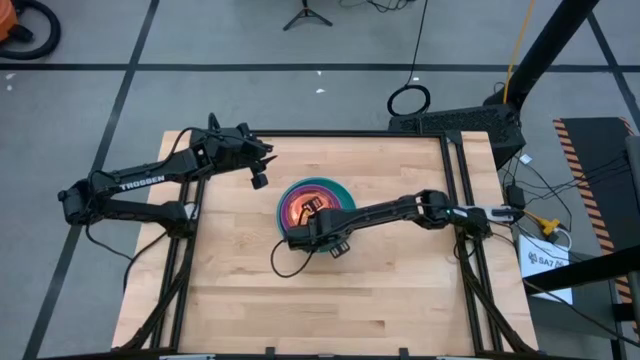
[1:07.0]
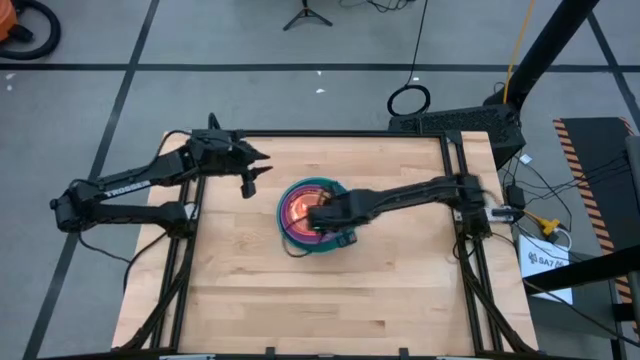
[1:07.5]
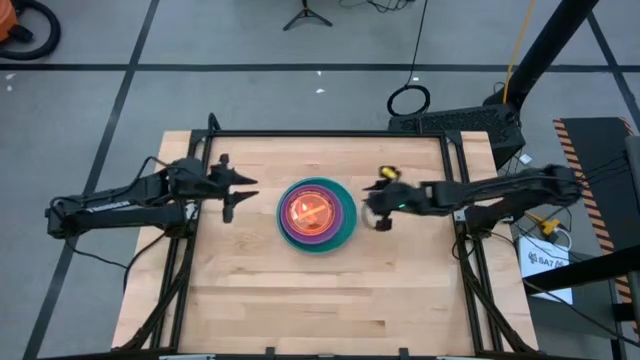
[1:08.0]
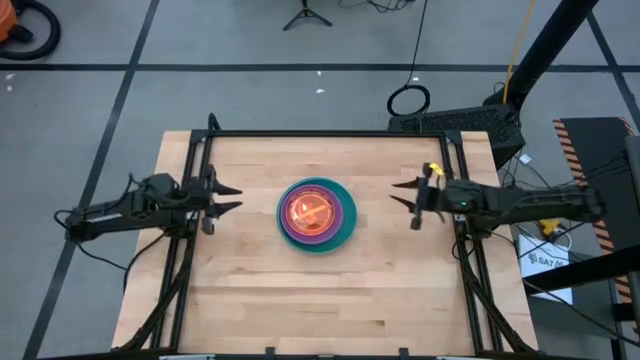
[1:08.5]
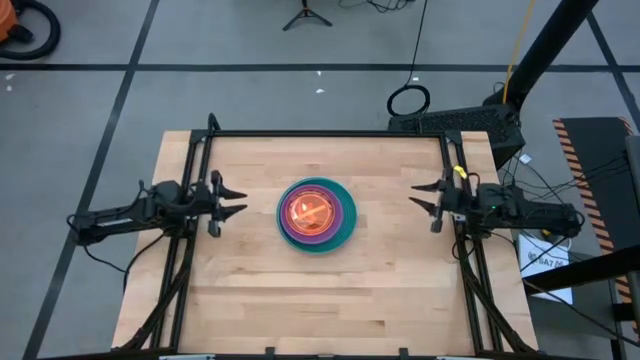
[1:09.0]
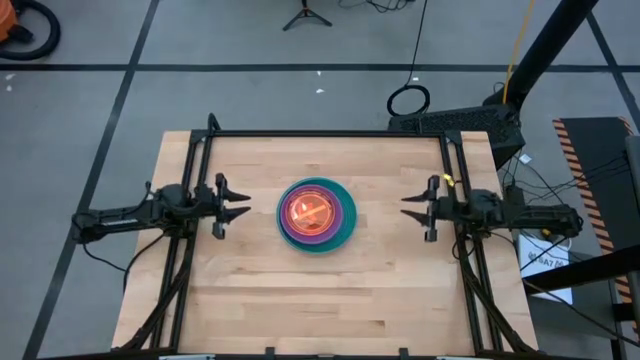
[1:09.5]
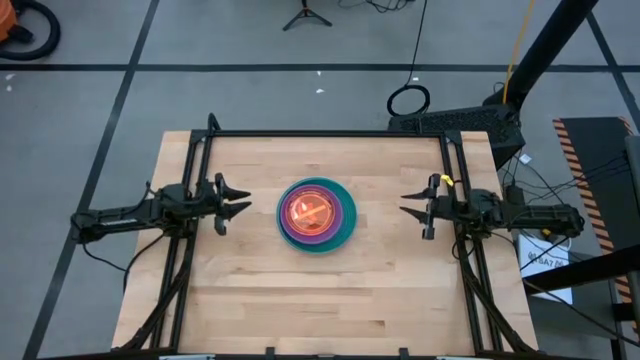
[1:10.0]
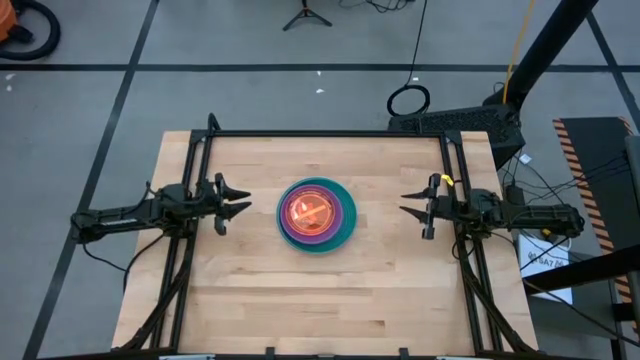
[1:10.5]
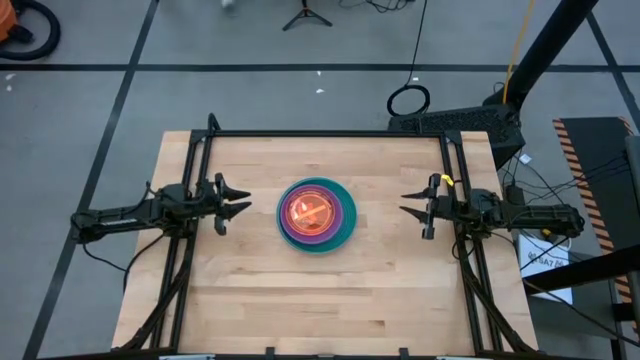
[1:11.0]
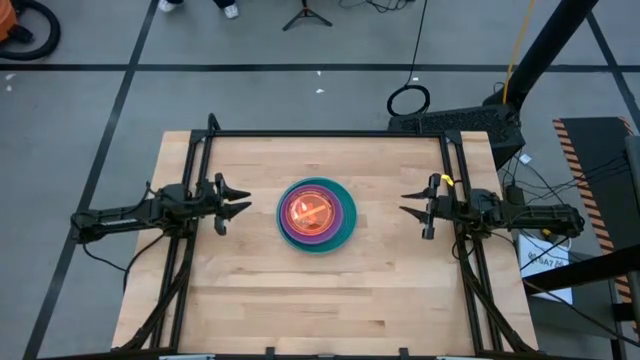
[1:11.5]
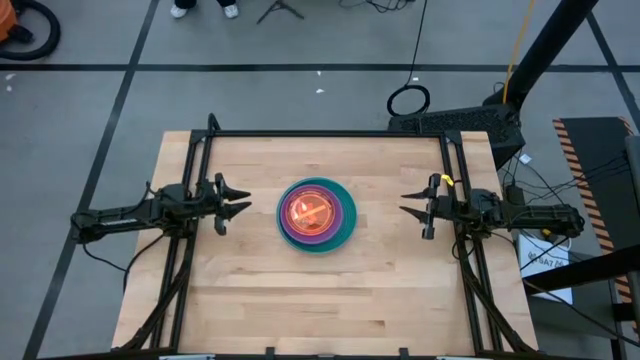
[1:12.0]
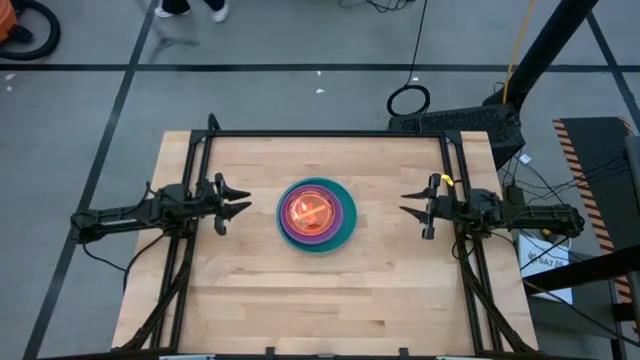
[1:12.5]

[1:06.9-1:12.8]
Task: Stack plastic plates
Return to Home Position

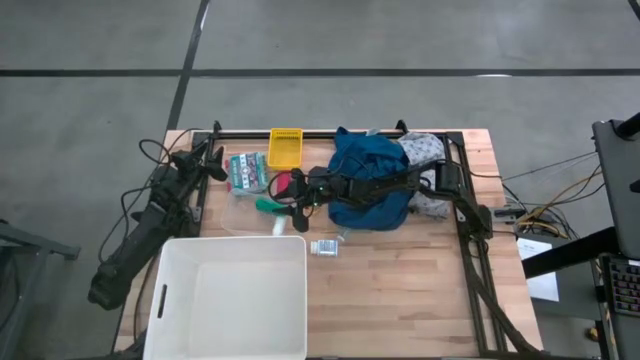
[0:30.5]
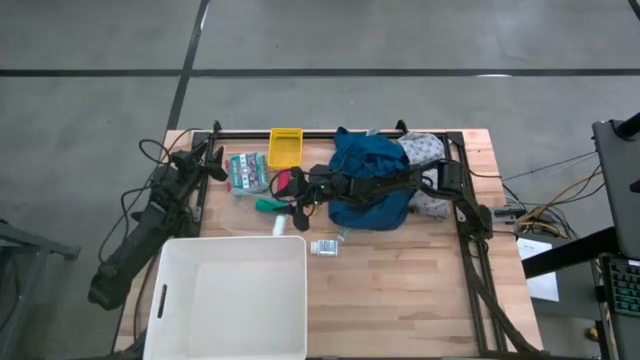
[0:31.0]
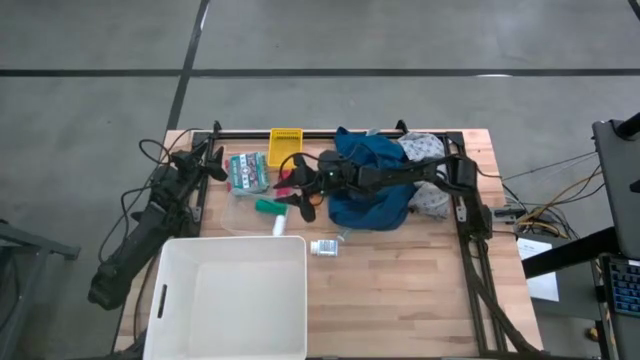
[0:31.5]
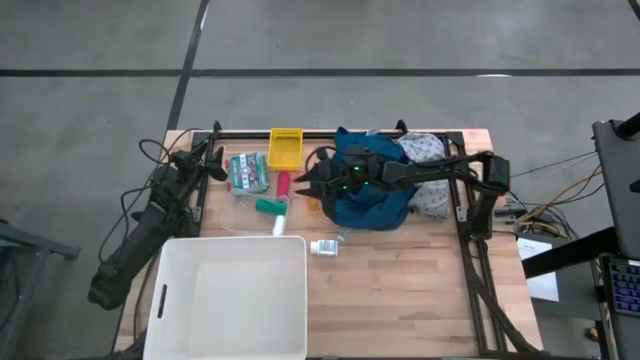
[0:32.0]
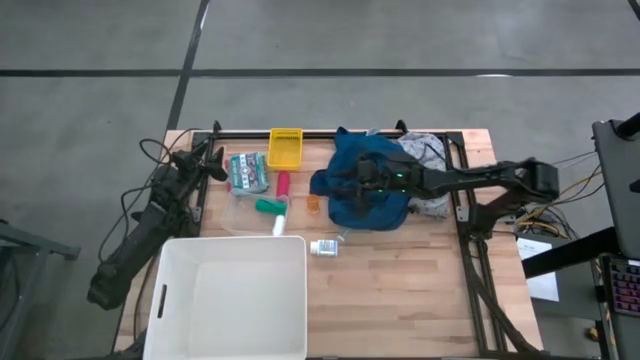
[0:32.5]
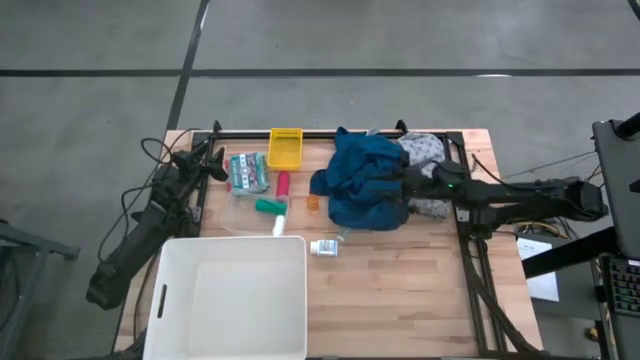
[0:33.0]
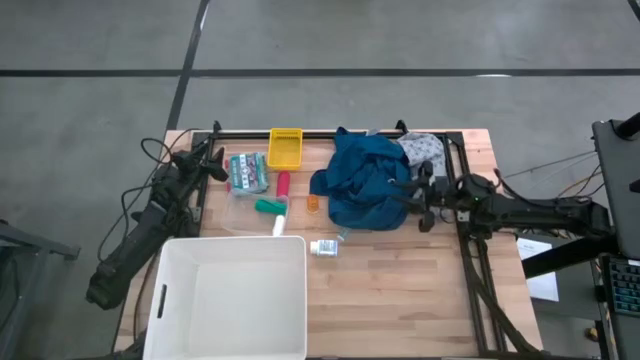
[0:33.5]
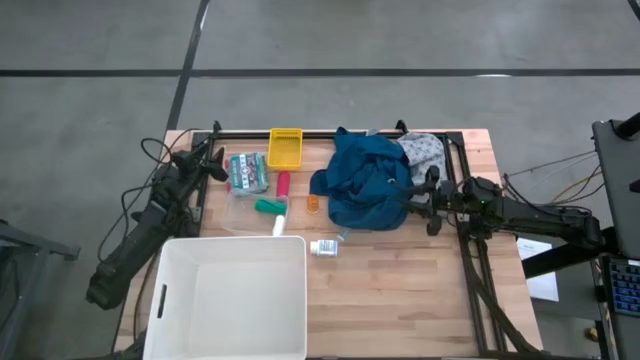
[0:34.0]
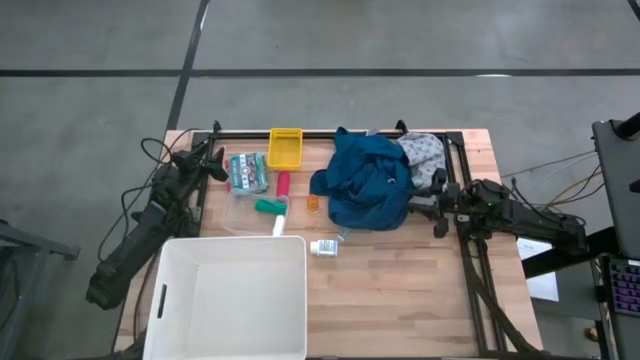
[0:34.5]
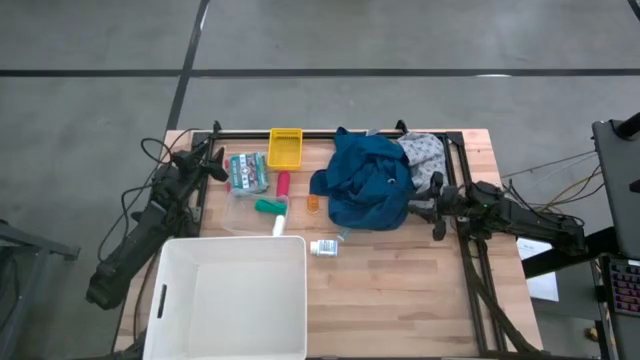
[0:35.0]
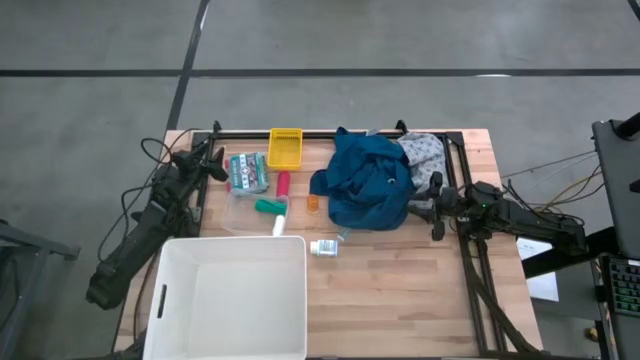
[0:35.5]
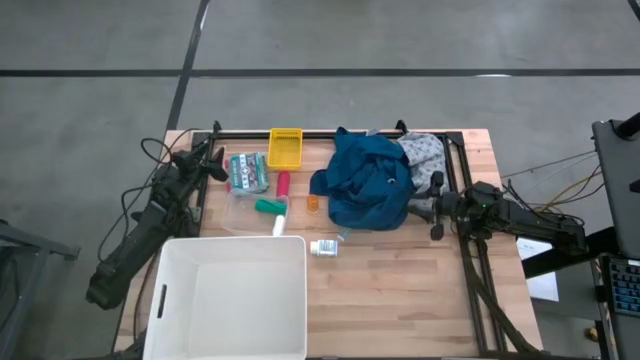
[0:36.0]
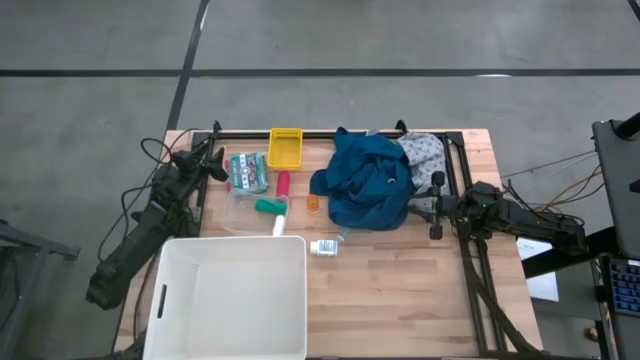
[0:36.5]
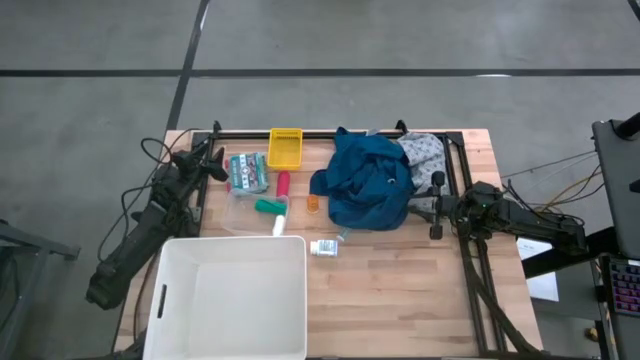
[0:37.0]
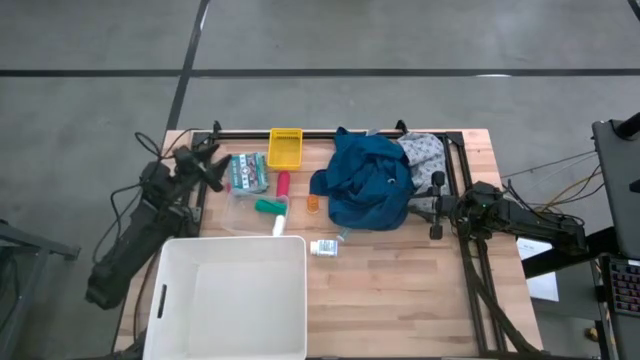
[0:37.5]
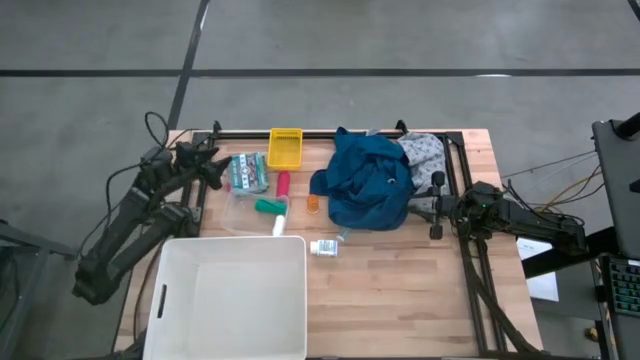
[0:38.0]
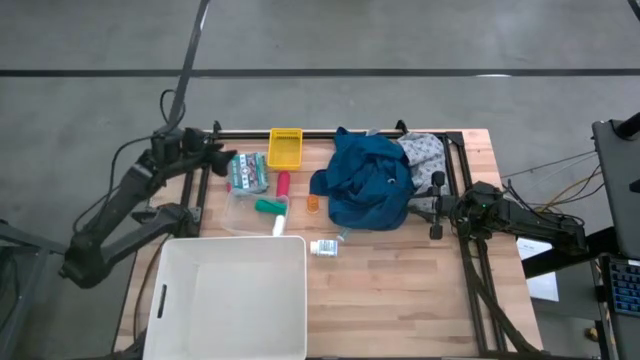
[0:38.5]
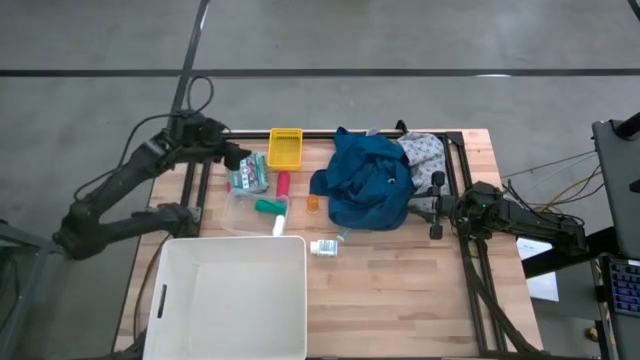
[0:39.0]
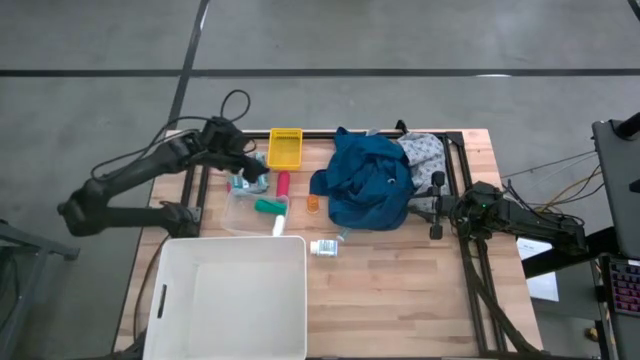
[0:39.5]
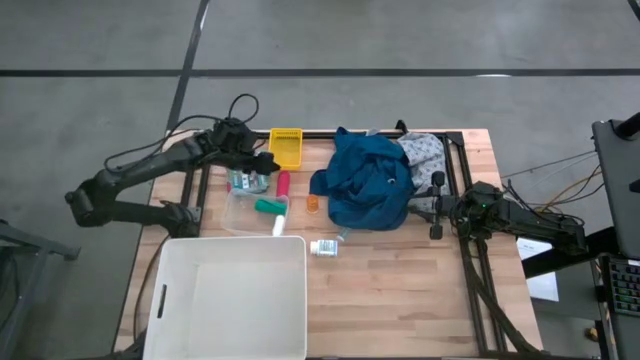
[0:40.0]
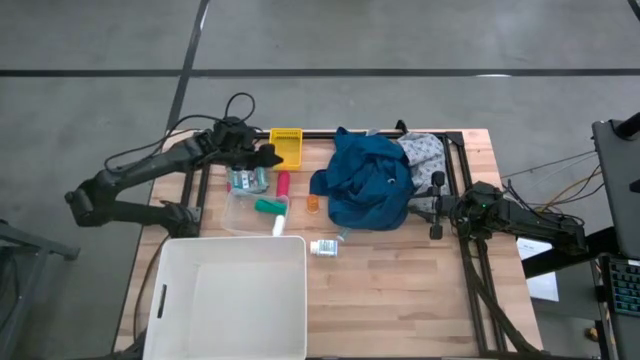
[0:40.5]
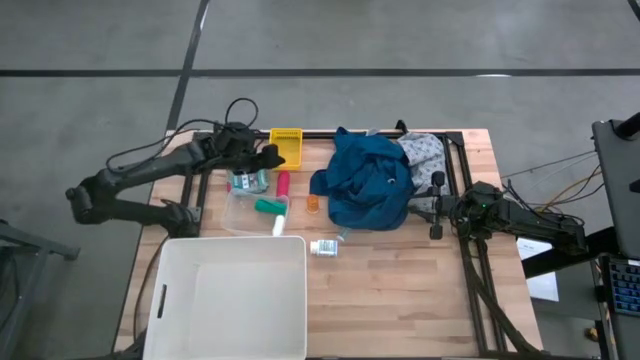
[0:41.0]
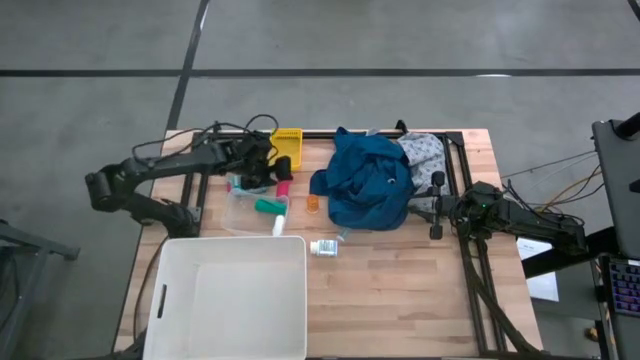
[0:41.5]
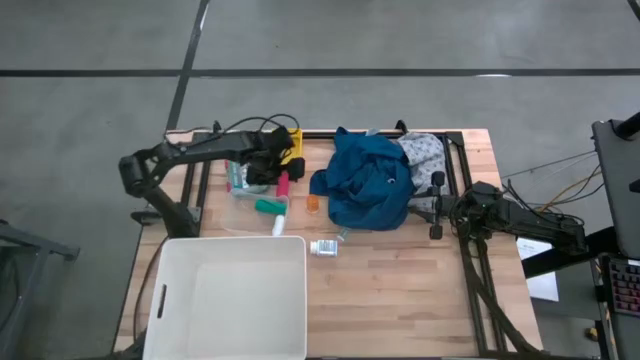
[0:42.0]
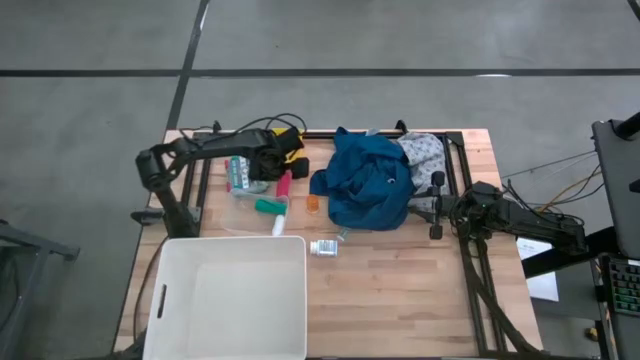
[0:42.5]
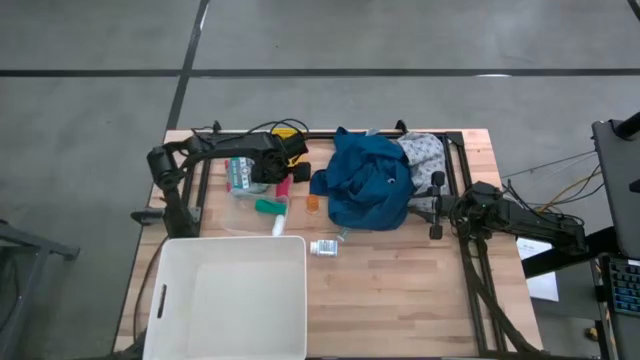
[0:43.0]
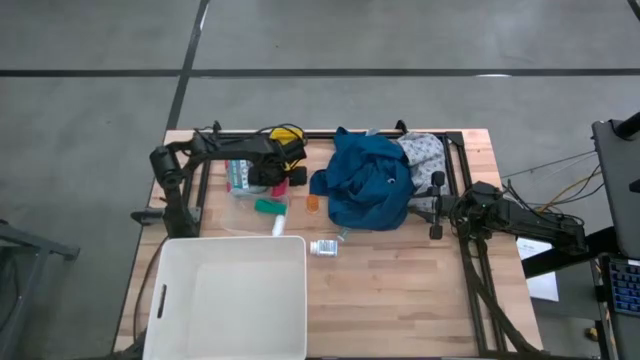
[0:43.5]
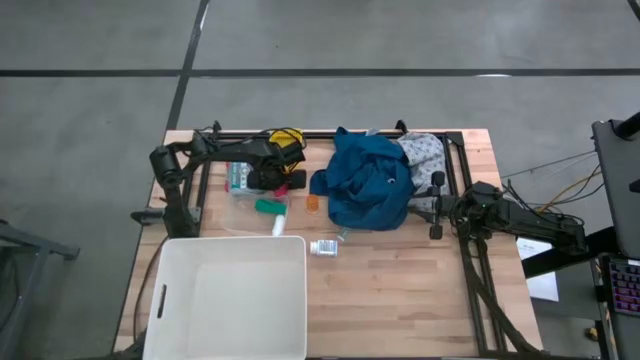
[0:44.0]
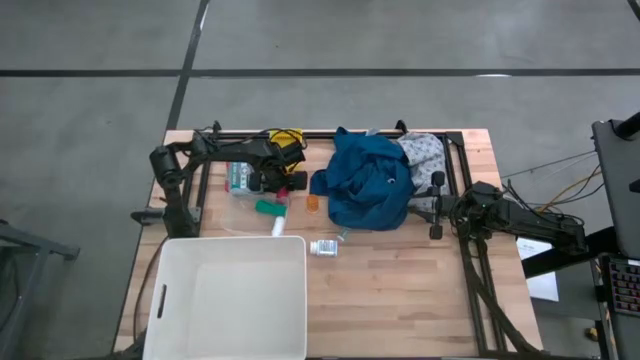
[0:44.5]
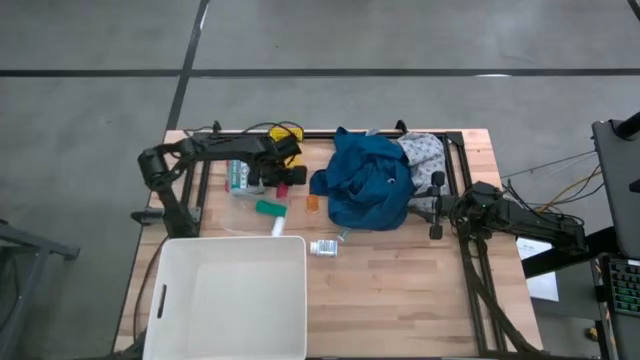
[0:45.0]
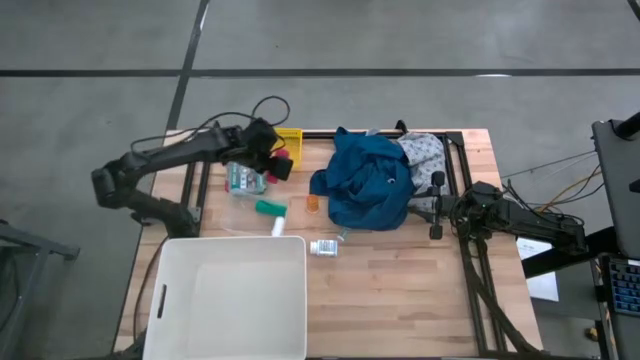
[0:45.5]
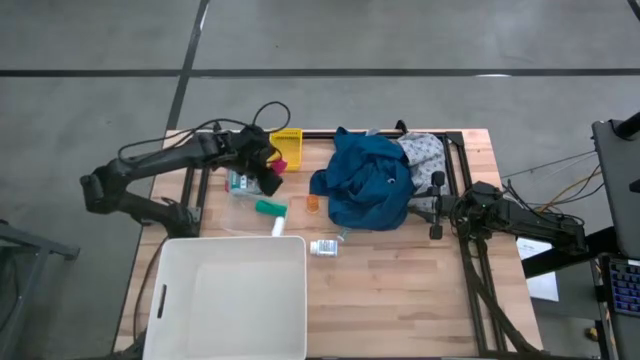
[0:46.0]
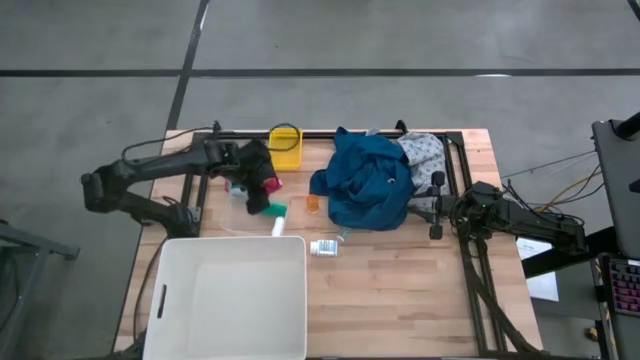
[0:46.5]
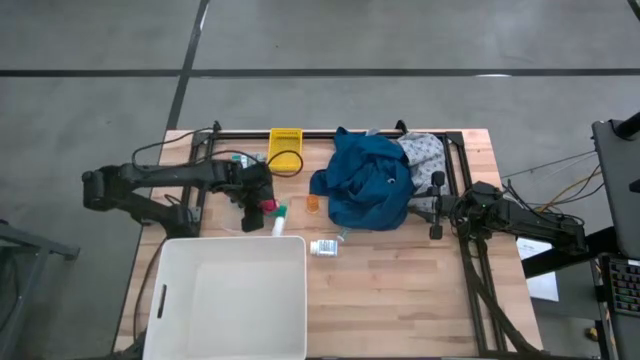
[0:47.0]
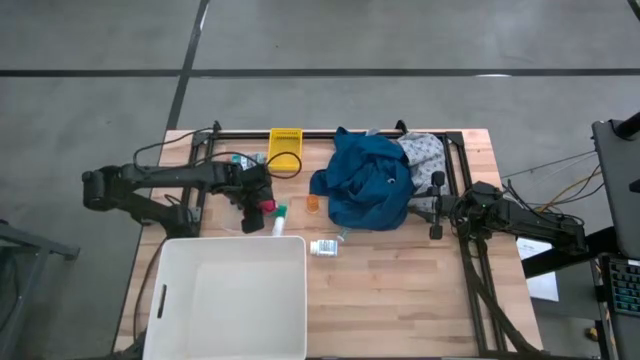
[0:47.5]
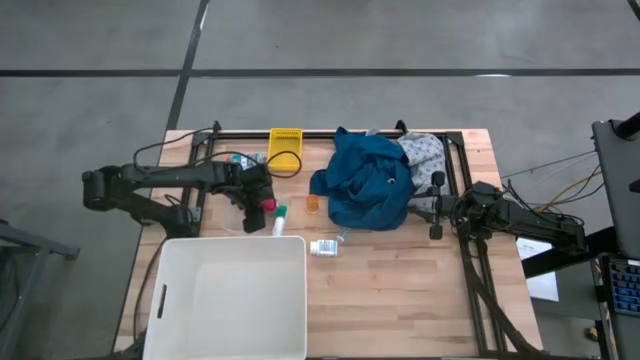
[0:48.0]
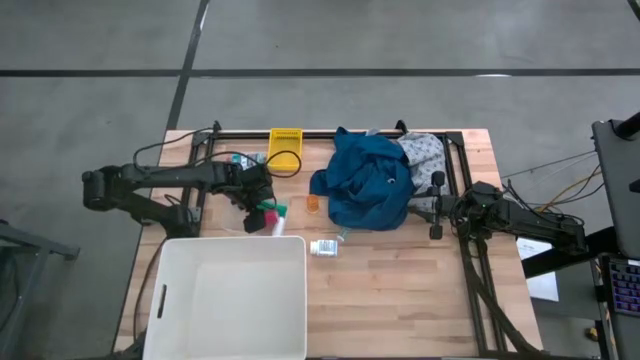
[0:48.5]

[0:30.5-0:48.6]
Task: Pick & place medical supplies in basket/bin
Put the red bandage into the transparent bin
